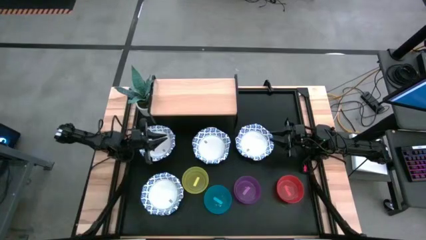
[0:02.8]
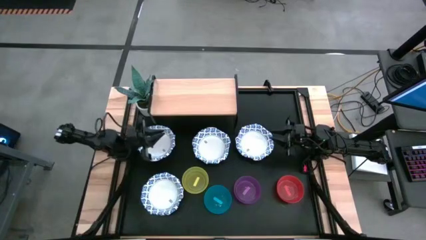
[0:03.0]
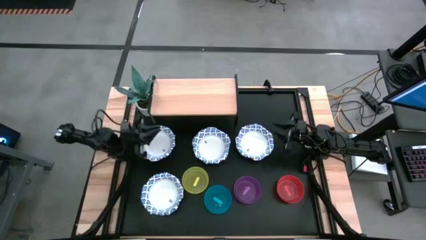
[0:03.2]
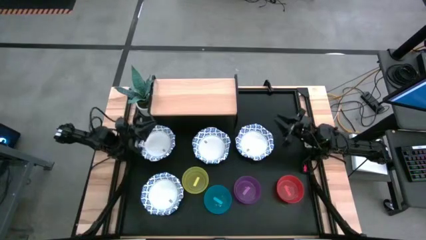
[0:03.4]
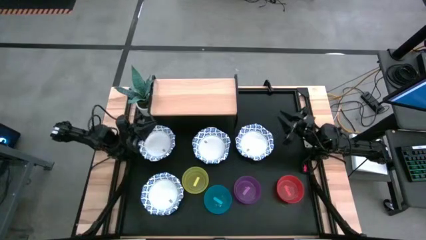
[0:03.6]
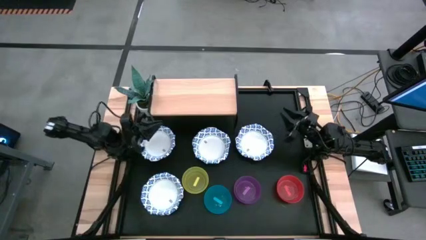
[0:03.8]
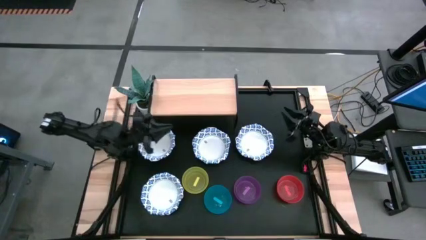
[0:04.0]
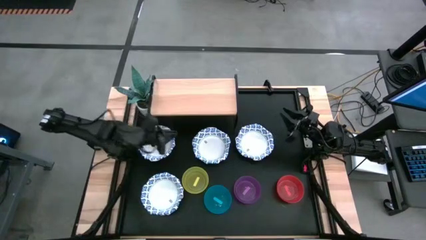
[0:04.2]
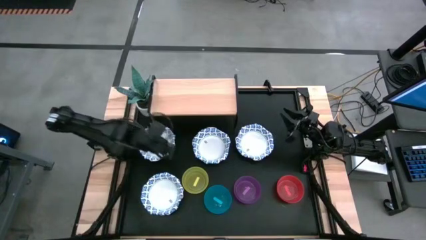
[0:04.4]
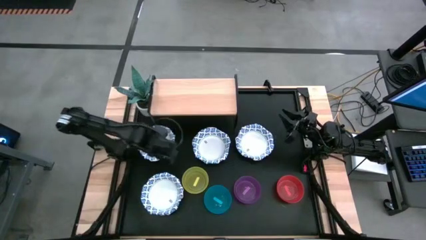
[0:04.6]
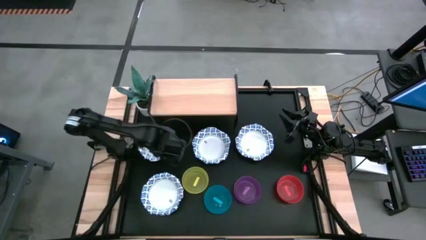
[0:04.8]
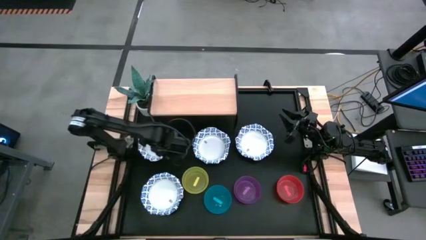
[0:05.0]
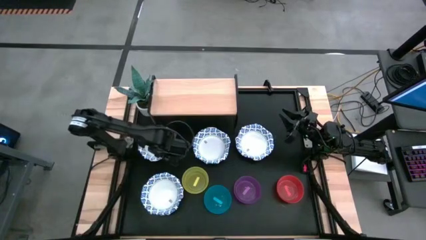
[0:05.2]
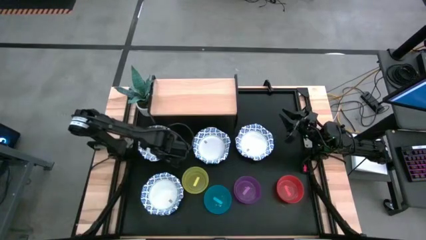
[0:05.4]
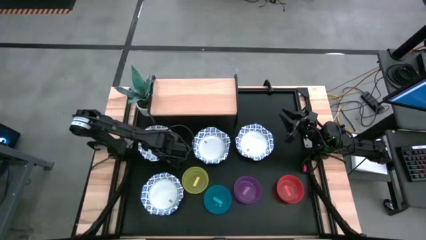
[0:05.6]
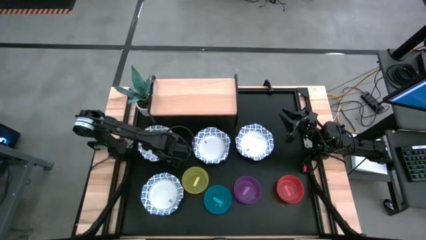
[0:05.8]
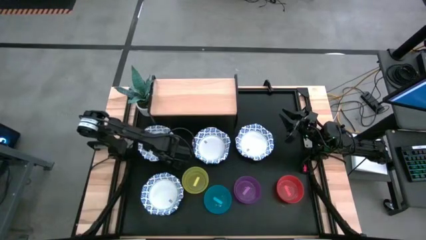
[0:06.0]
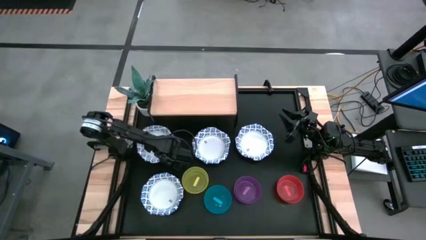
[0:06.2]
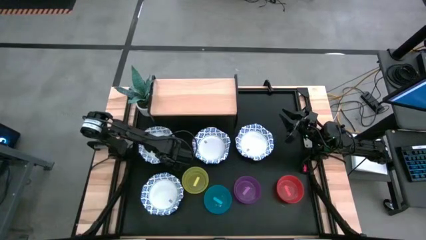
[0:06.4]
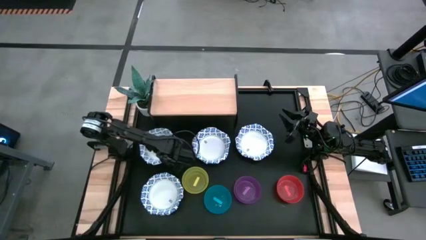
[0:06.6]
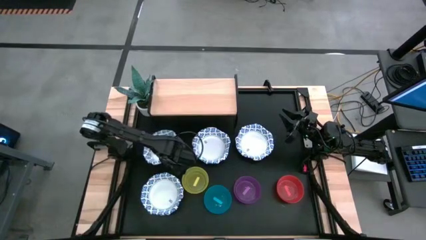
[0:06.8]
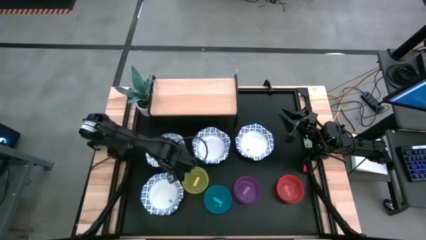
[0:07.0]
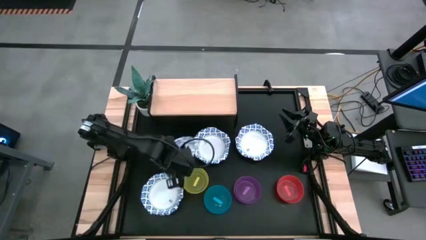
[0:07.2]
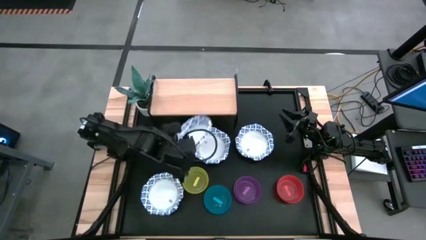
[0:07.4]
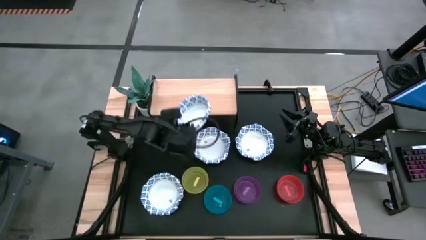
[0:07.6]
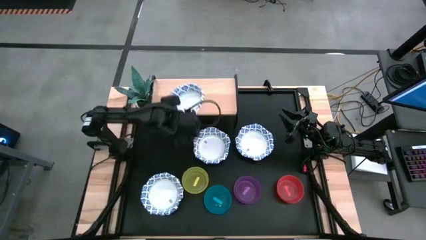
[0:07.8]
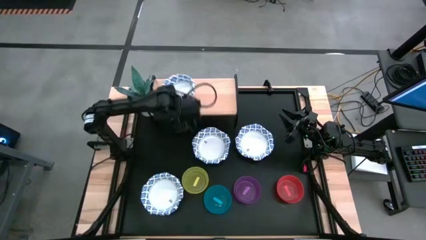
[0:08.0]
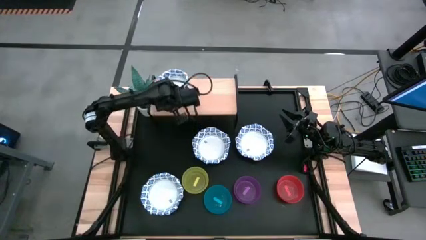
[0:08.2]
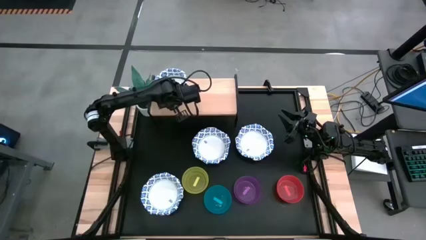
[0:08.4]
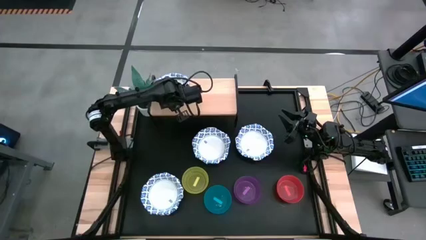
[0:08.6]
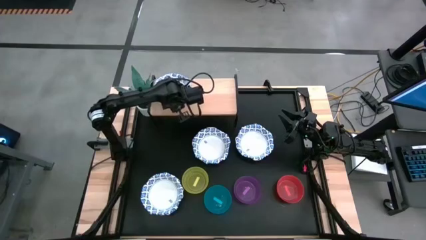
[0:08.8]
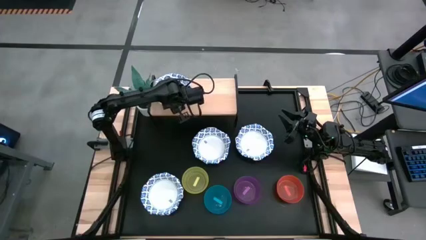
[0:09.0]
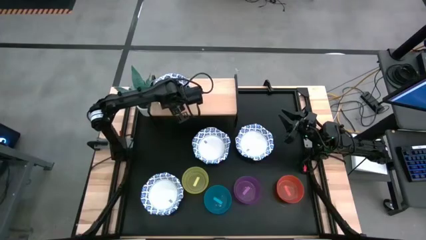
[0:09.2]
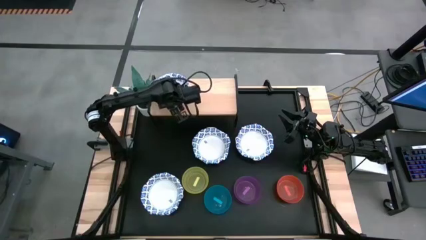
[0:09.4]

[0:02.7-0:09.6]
Task: Place and stack bowls onto a shelf
Put the white patterned bowl on the shelf

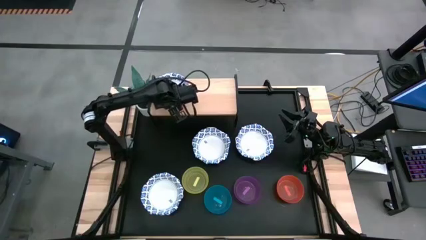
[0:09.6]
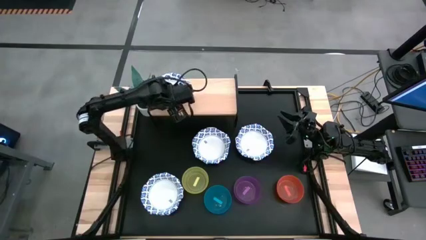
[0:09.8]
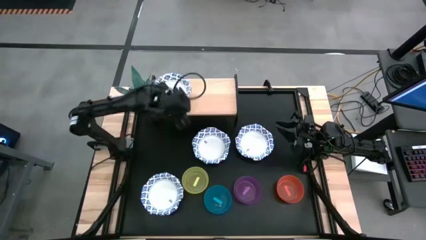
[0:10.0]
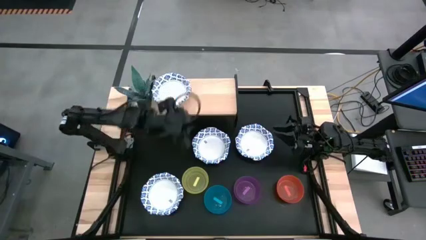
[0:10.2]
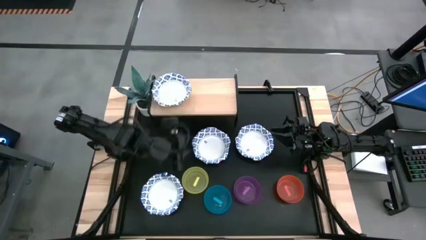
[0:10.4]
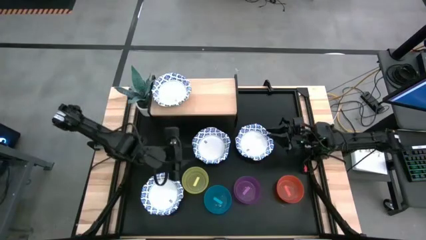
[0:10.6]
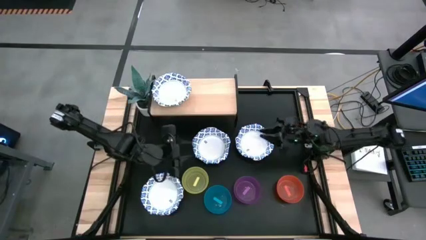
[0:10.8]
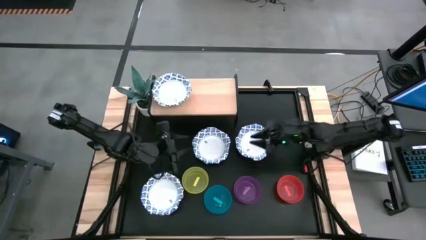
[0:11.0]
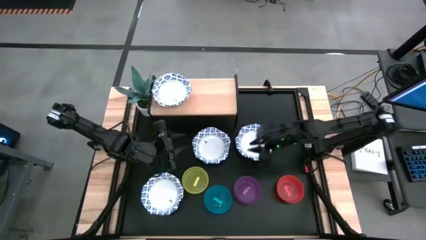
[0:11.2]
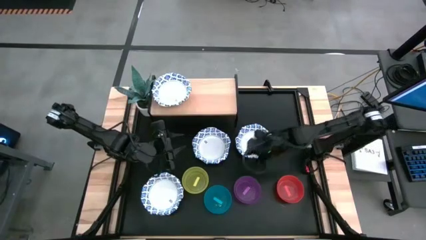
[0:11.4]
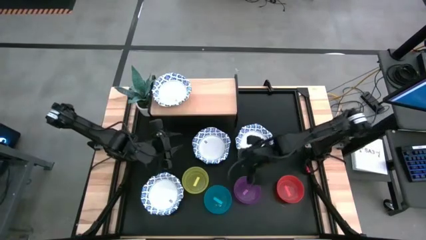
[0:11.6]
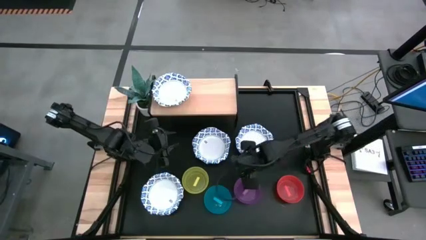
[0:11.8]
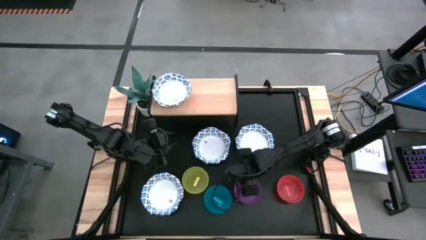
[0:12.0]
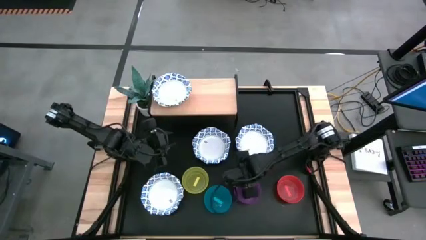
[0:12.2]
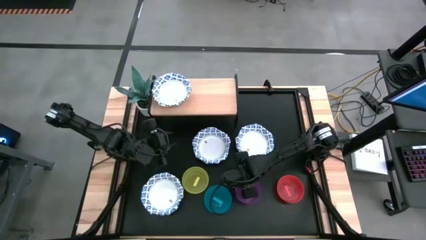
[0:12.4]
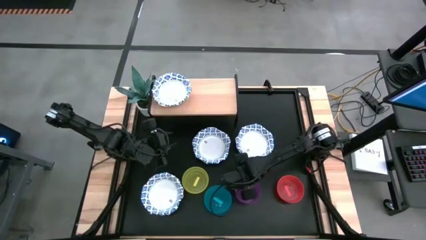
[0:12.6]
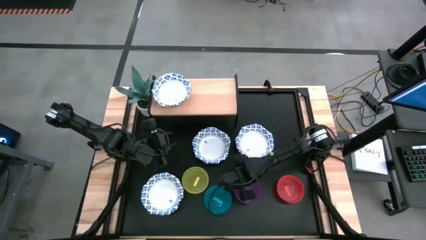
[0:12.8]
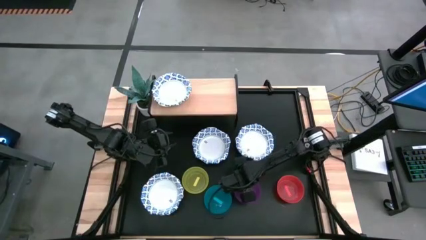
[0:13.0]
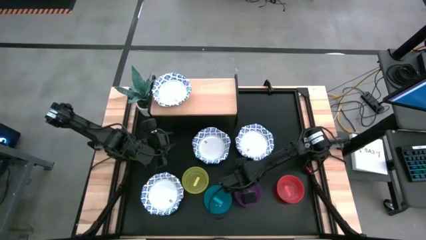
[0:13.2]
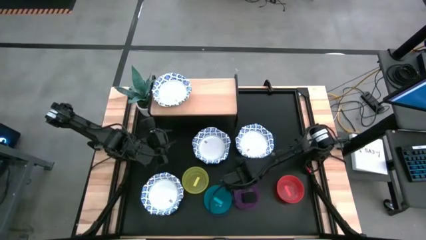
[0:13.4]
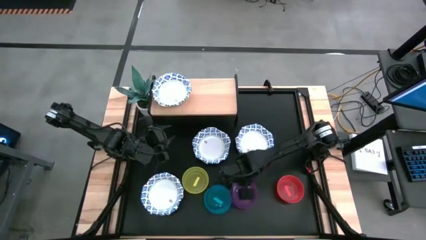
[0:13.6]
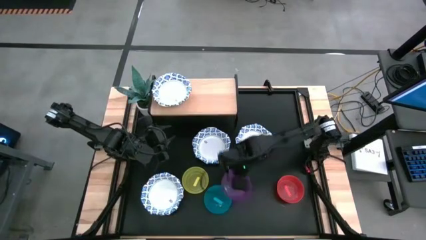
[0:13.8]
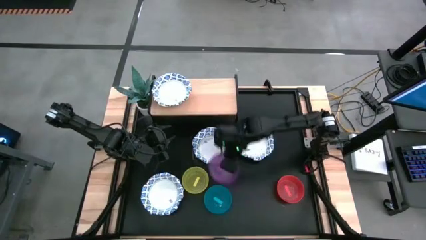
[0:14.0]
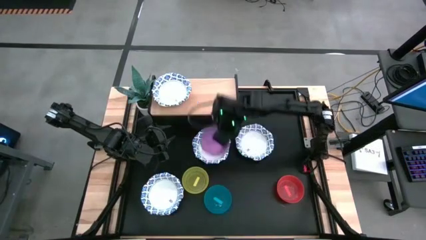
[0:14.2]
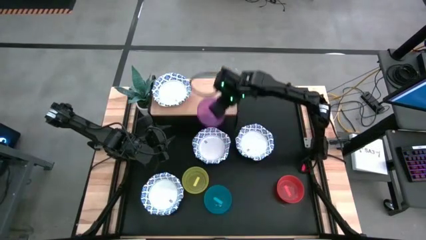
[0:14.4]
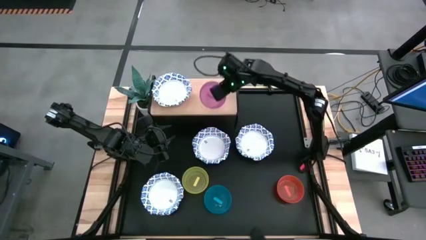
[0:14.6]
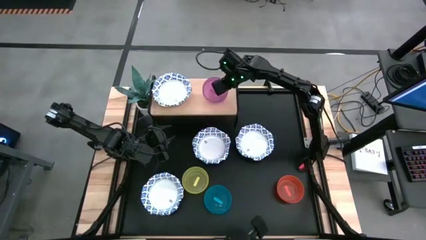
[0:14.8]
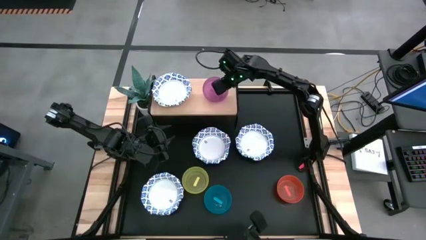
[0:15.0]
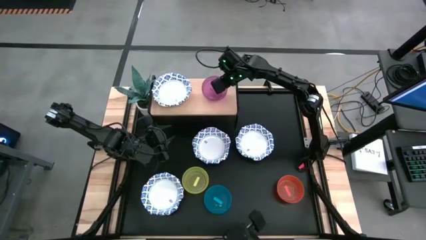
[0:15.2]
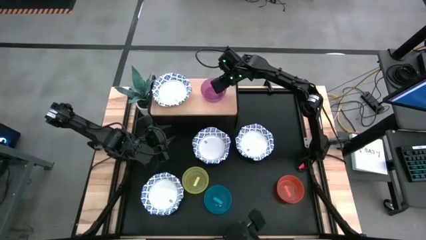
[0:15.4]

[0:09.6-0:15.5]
Put the purple bowl on the shelf

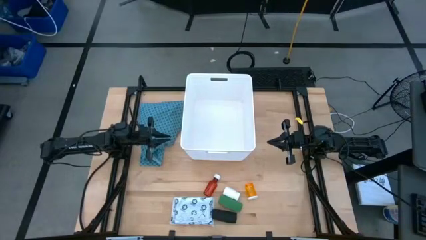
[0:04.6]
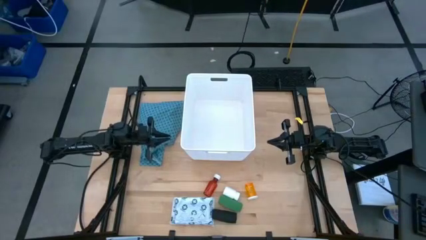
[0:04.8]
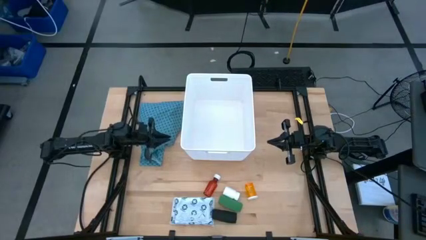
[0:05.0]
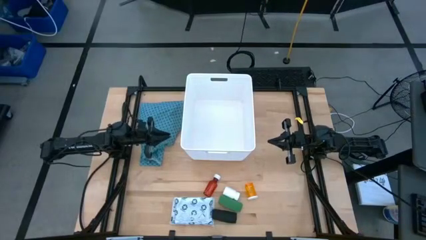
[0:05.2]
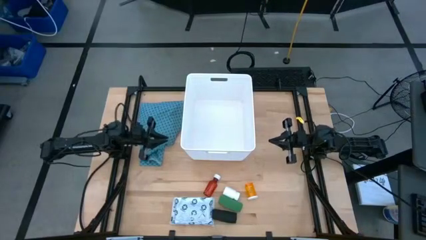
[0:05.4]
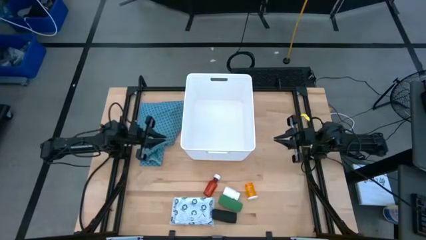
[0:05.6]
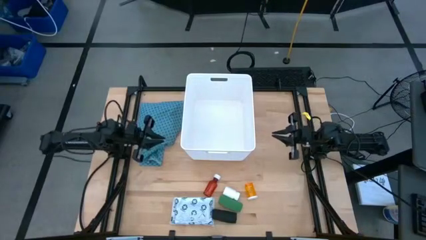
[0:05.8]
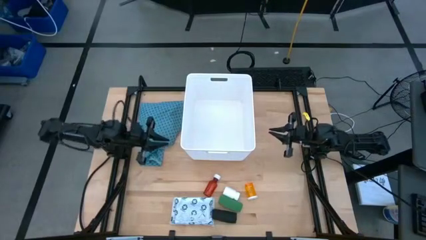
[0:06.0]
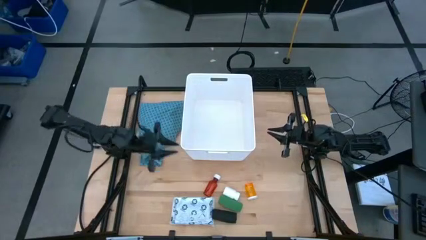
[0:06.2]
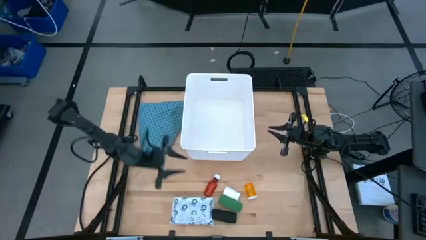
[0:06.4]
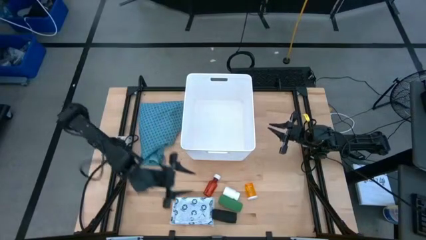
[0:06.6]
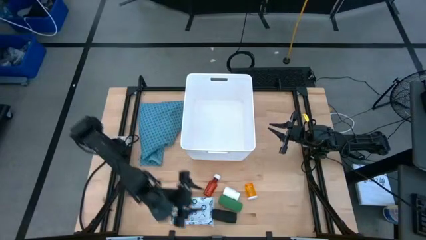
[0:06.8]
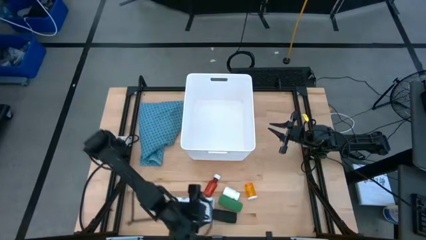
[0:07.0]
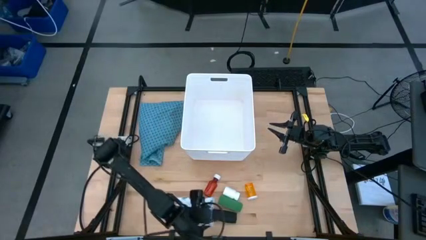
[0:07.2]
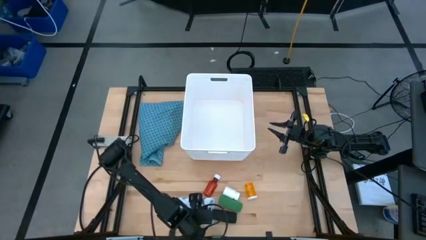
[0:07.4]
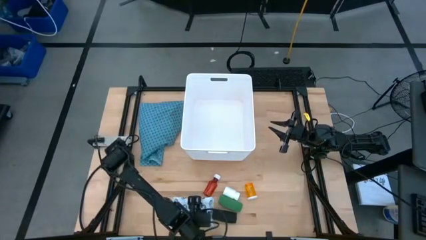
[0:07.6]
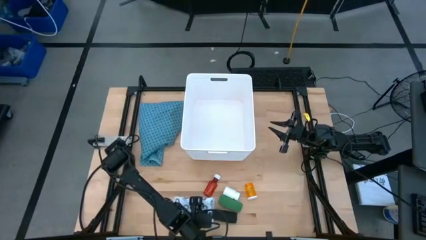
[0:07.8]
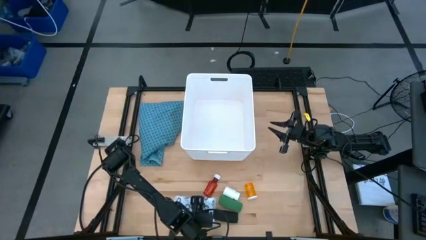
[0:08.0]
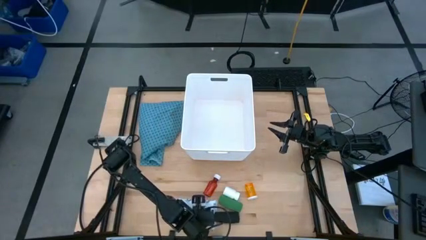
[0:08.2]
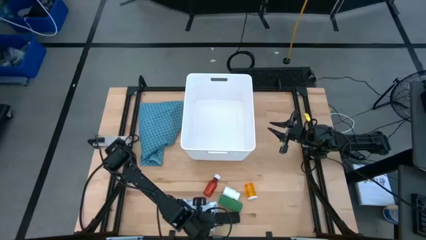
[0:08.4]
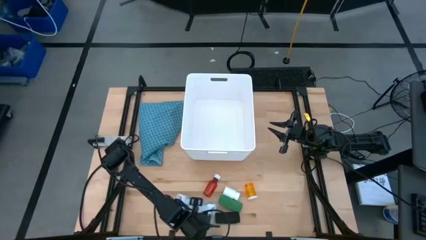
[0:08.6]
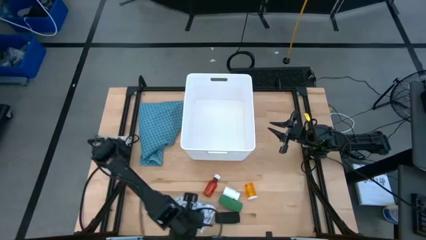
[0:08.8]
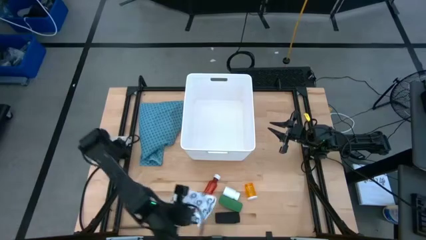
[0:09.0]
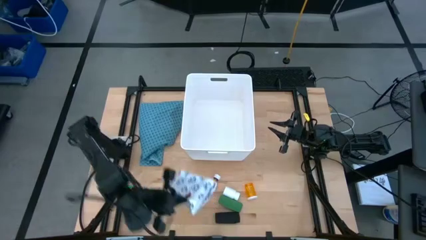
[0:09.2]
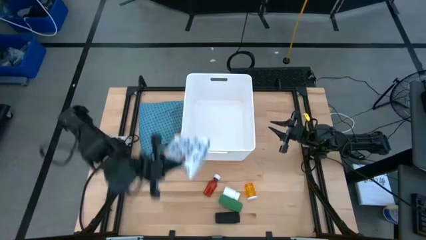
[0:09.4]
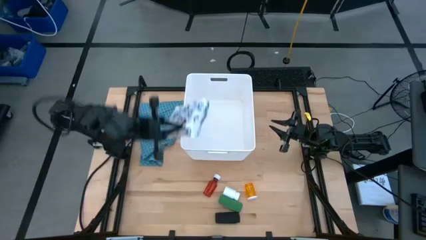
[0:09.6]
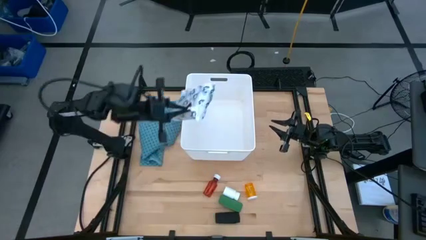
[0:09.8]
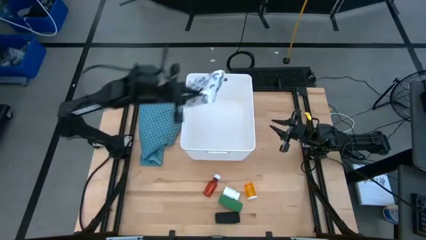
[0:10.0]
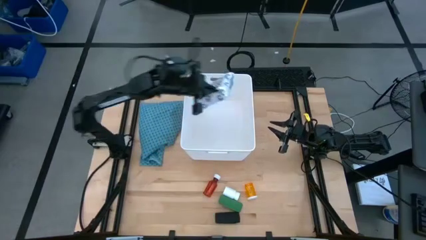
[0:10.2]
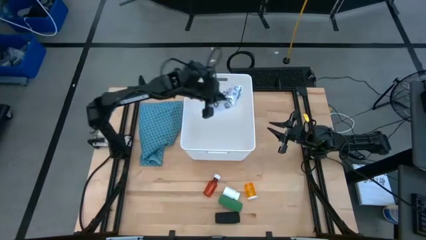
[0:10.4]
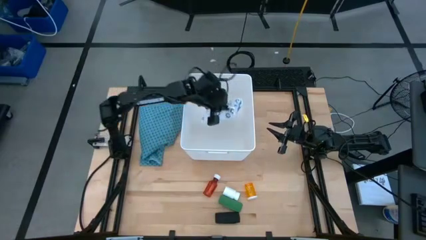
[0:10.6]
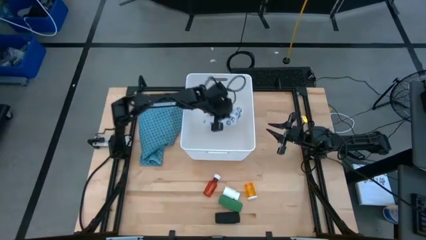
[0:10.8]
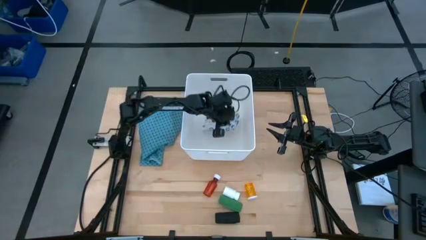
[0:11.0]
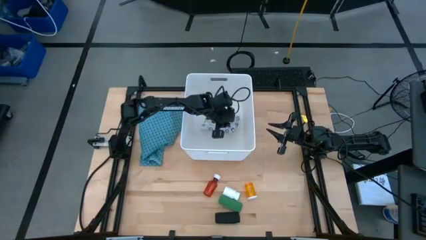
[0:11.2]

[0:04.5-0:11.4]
Task: Pick & place medical supplies in basket/bin
Put the mailer bag in the white bin
